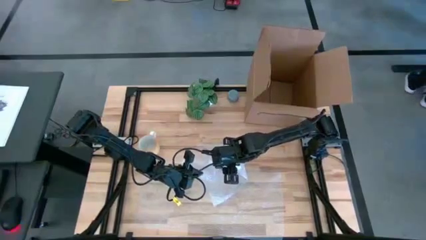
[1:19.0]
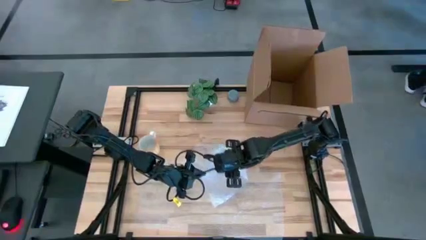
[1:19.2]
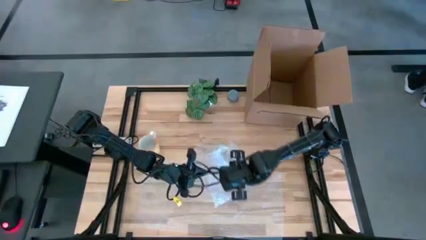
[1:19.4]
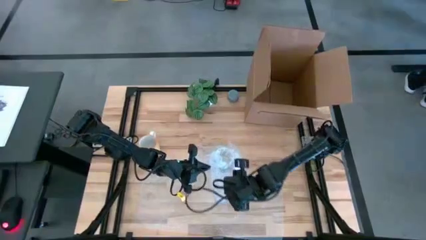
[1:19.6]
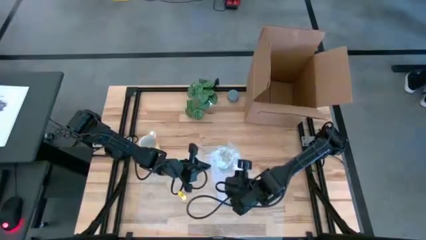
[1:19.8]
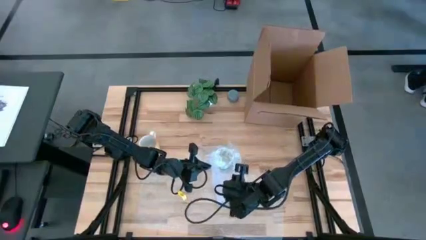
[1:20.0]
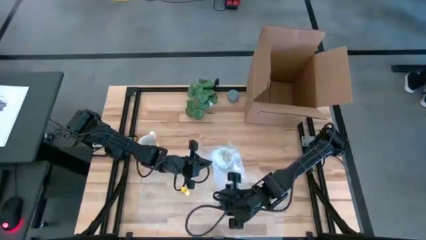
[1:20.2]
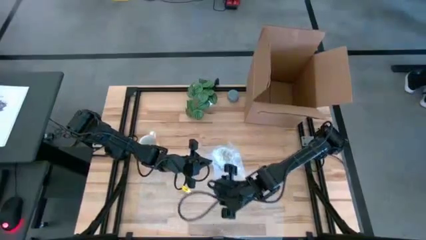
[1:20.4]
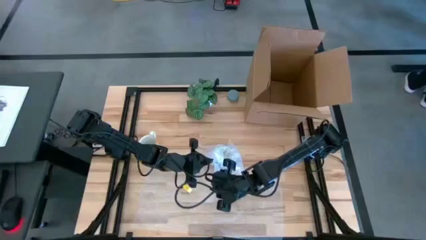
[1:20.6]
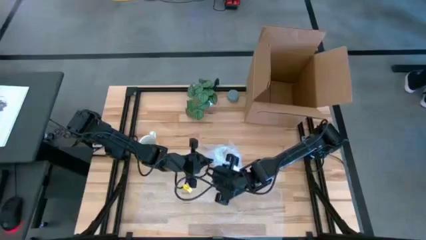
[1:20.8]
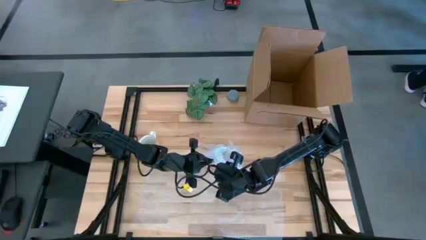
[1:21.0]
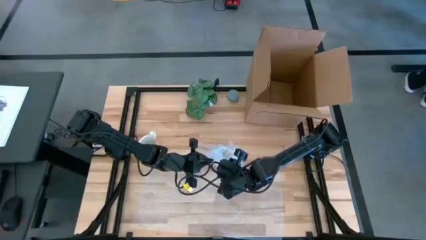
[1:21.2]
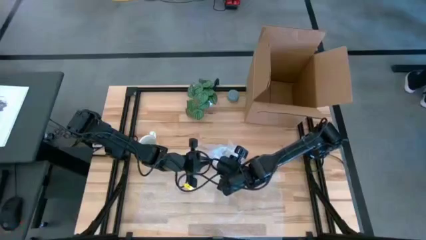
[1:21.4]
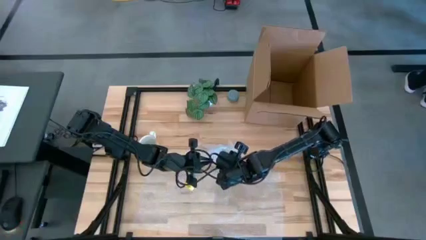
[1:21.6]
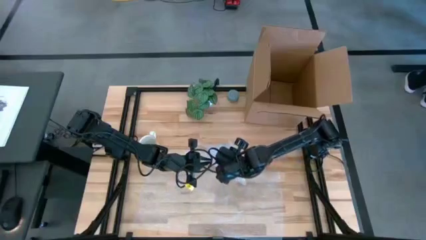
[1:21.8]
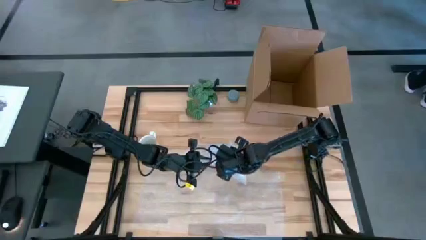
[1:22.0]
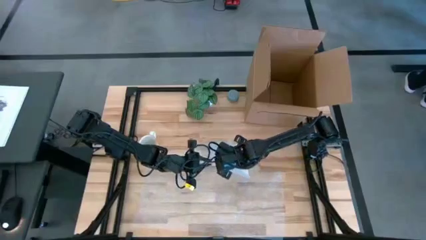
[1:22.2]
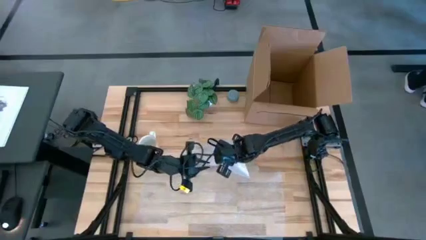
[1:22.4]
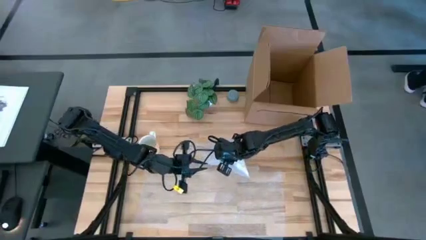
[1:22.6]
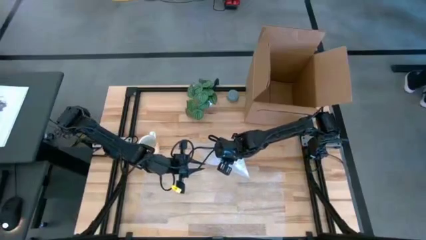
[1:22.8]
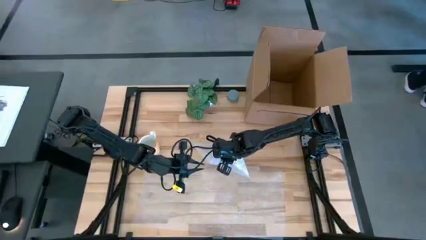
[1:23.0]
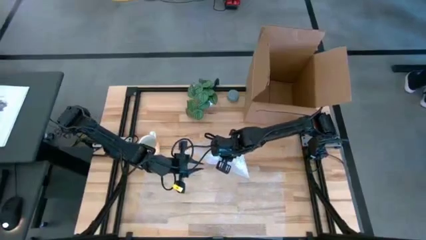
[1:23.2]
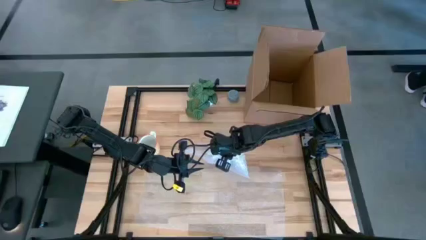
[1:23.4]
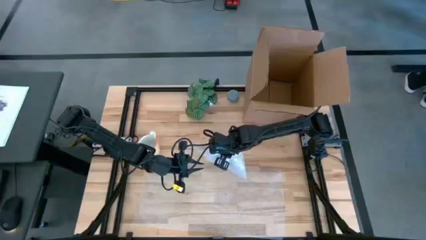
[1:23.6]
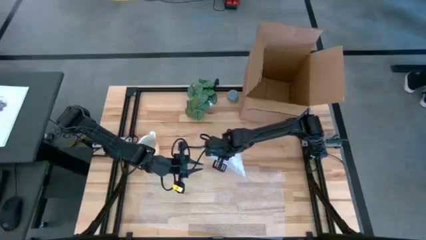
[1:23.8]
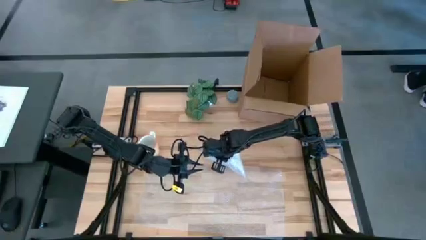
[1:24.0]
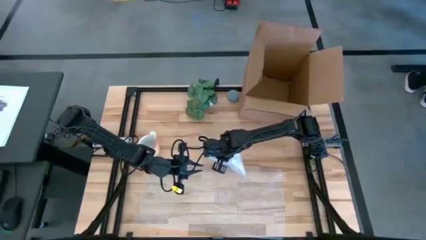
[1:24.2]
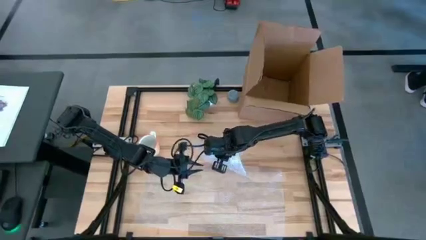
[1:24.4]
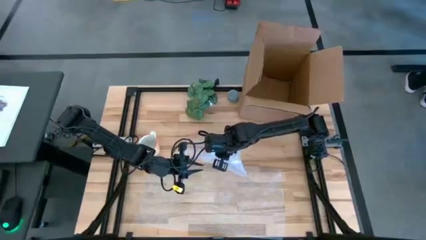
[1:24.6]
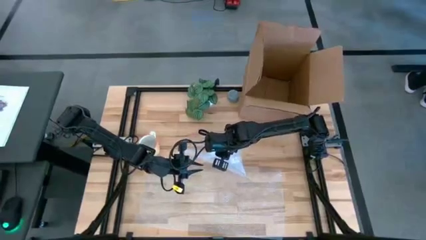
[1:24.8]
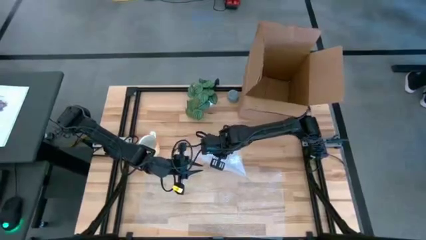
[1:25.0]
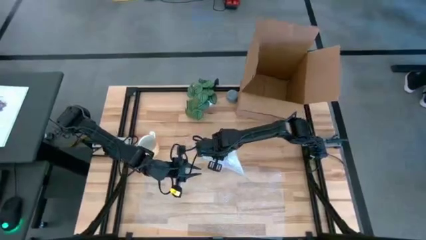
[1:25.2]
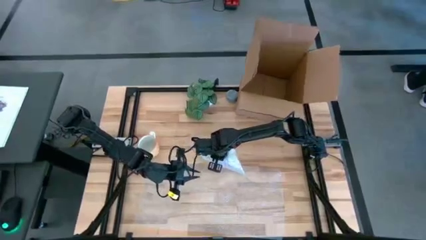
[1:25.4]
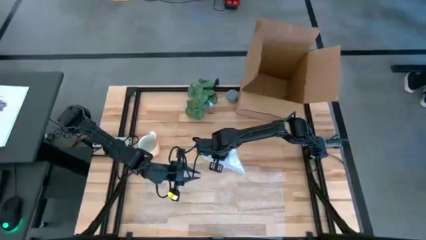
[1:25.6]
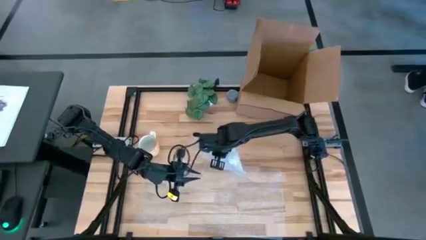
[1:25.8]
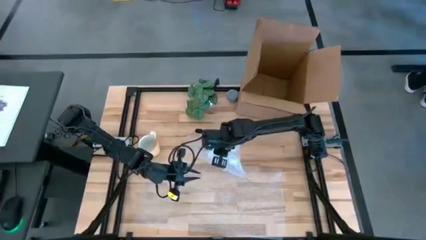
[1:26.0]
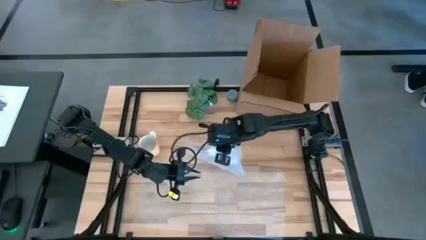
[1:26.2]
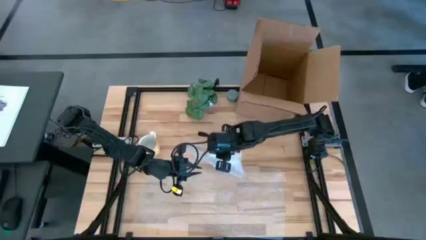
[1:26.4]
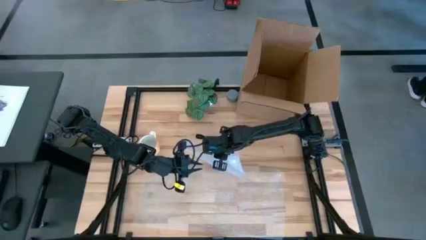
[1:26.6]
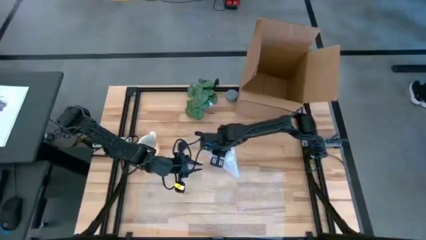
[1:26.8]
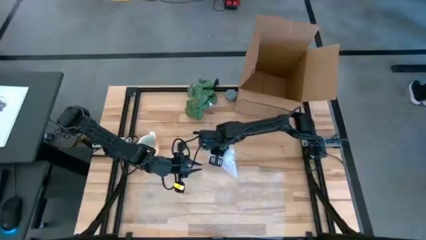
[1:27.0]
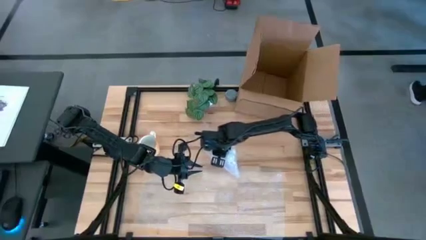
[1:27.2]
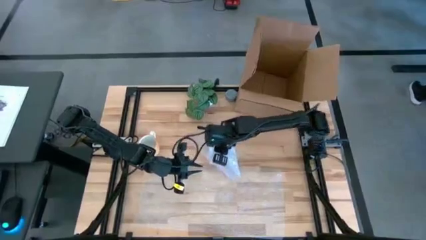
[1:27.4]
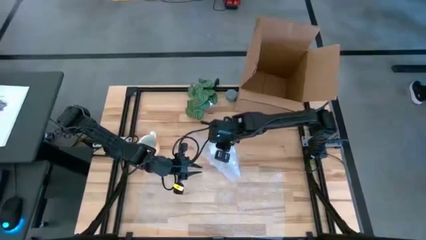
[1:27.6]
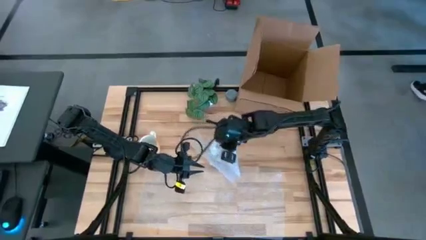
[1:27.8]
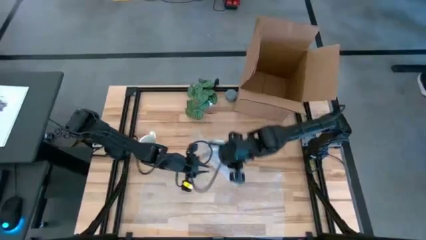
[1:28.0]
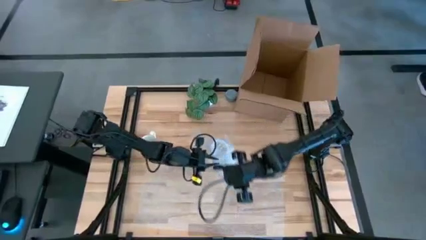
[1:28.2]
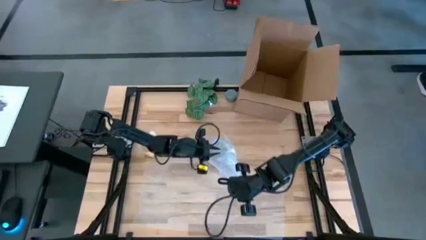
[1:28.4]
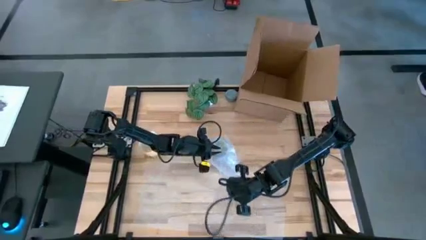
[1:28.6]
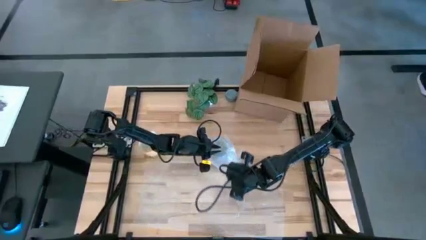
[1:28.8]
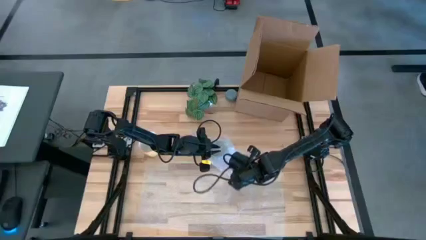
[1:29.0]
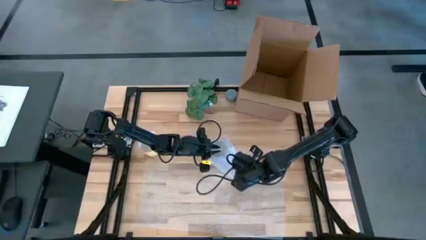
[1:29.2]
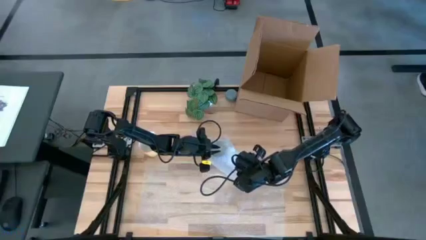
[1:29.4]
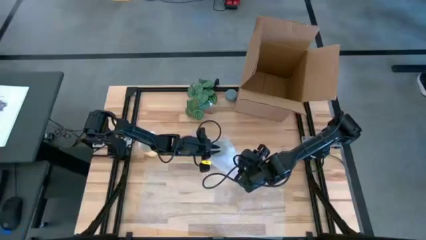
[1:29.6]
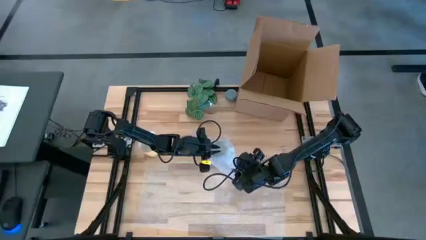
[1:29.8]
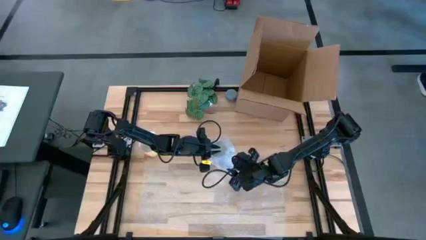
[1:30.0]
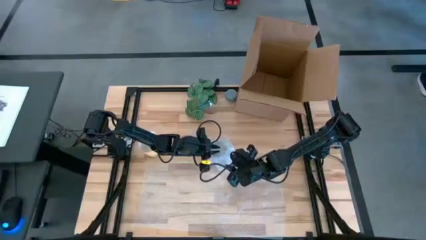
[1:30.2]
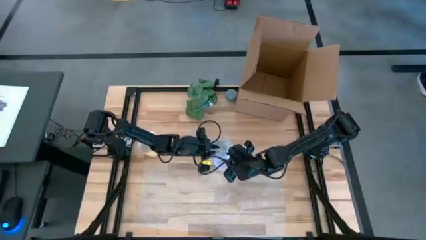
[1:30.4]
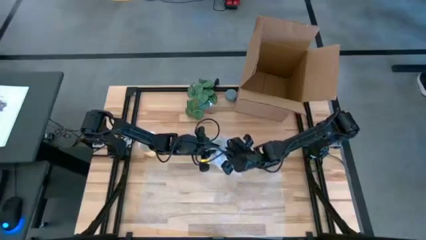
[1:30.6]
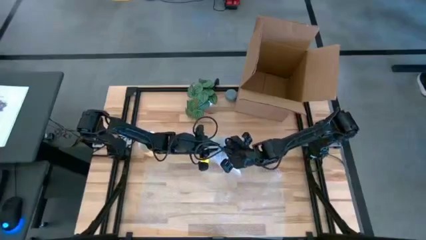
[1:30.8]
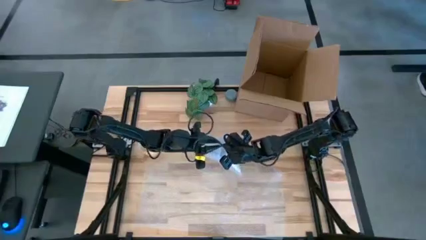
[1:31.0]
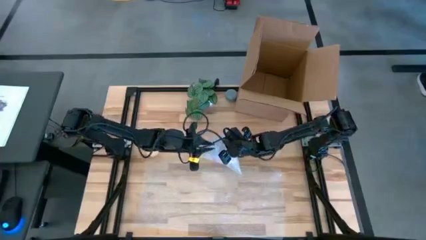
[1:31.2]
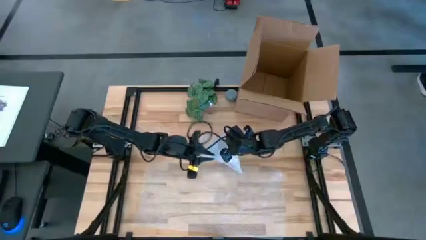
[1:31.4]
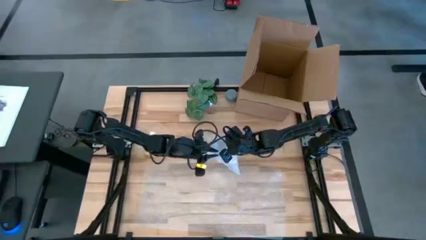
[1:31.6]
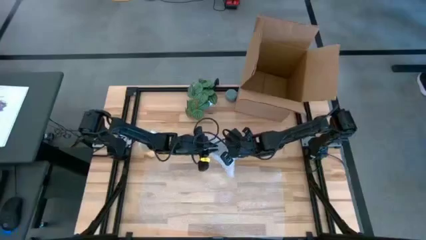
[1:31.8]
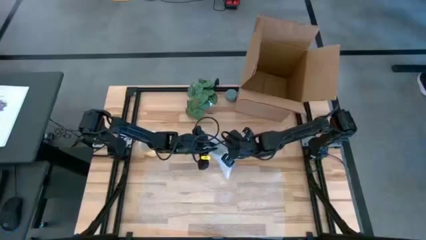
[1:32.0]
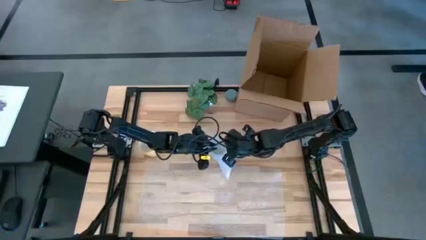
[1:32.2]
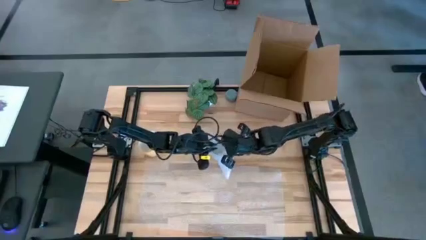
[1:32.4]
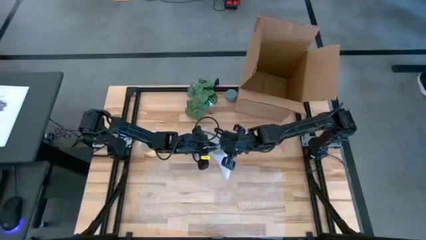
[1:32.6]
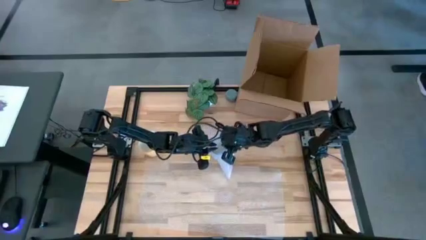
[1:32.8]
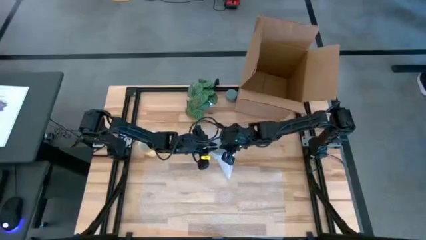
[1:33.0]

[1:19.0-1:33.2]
Task: wrap mug
Wrap the blue cup with the bubble wrap

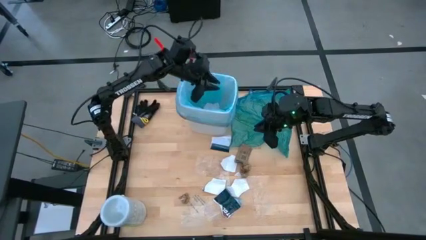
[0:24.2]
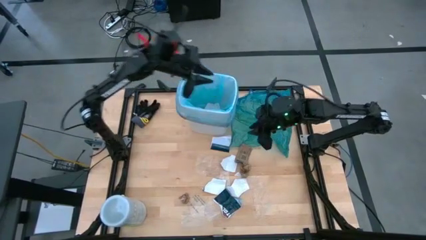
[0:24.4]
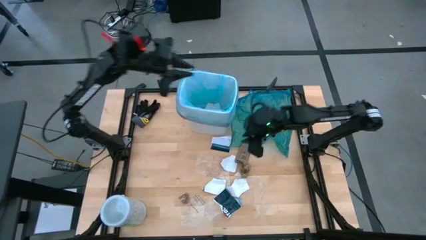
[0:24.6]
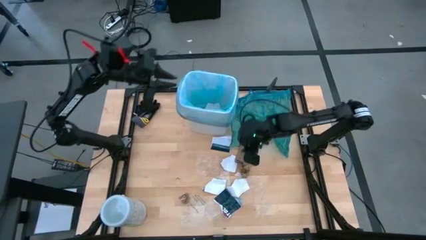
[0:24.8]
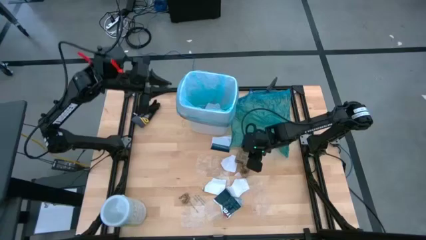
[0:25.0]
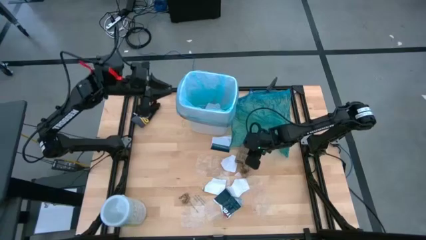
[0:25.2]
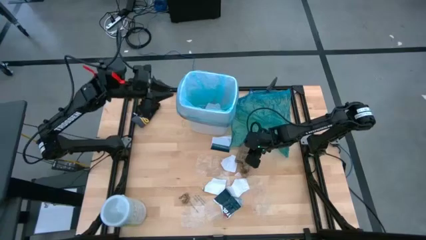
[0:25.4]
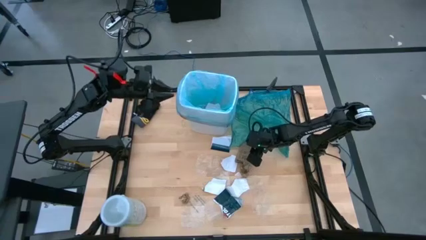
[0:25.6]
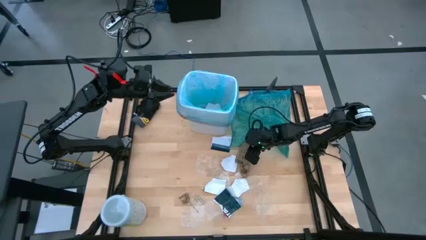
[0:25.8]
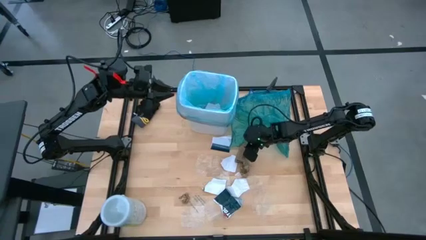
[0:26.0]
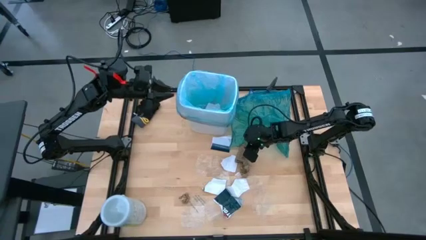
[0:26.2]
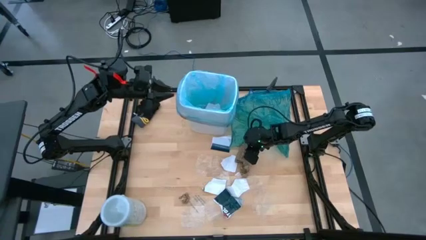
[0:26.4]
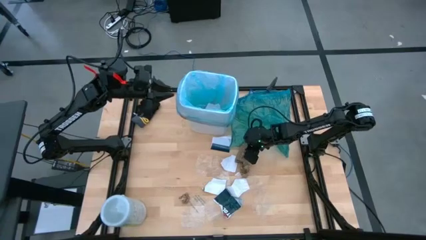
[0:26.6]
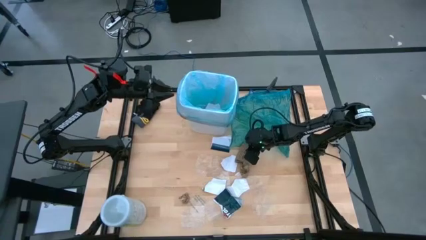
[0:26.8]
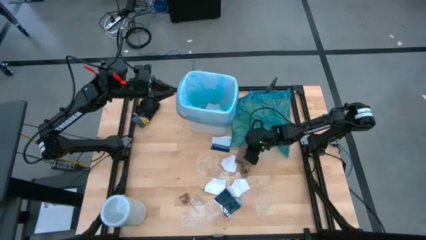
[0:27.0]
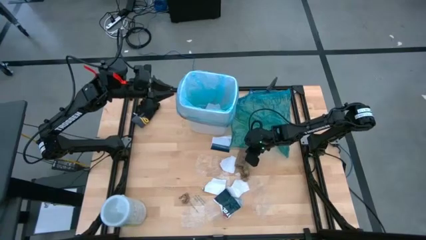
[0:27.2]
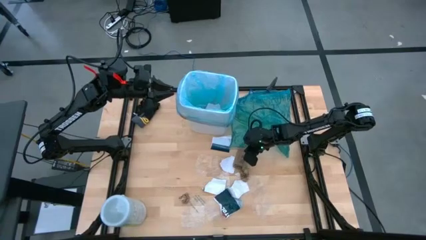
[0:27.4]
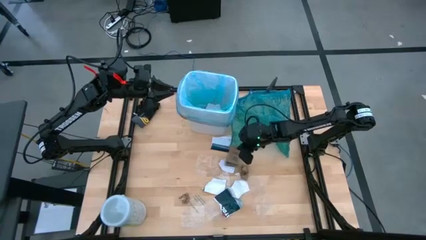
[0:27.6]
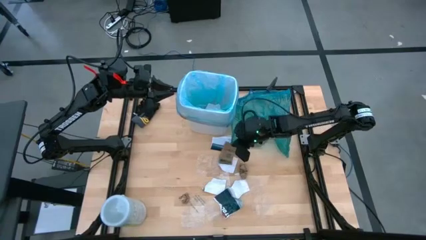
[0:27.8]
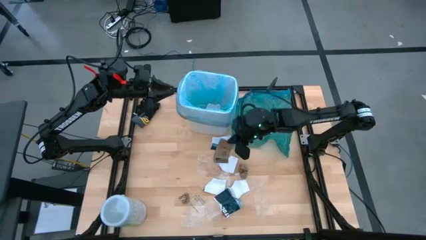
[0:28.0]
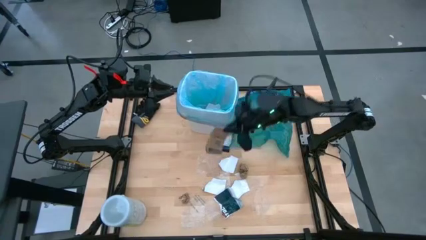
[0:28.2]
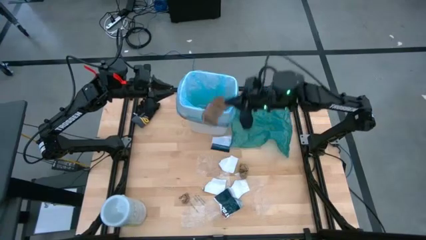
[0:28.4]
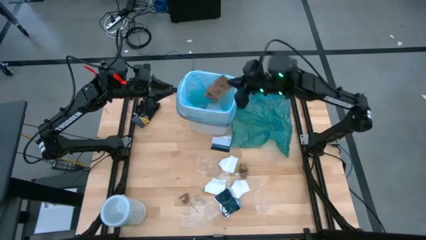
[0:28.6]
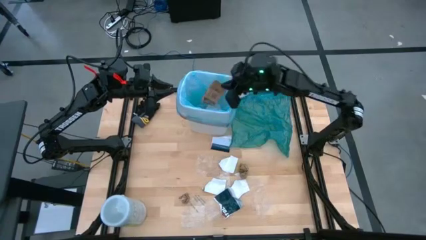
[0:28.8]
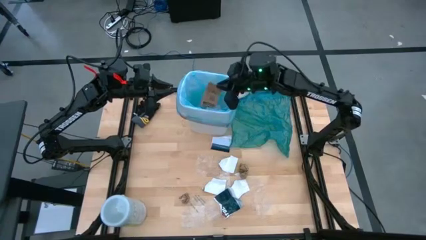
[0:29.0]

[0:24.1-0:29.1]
Task: place trash/remove bag and relplace
Put the brown paper bag into the trash bin
